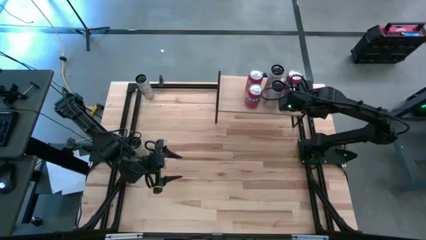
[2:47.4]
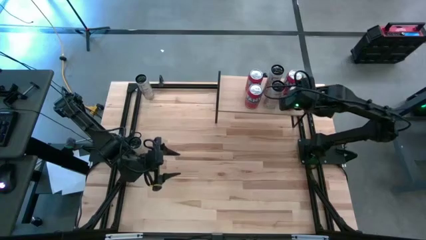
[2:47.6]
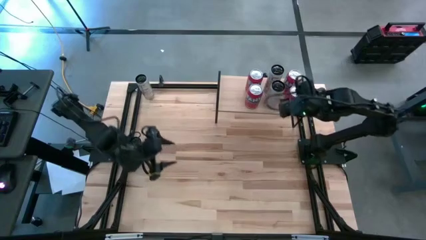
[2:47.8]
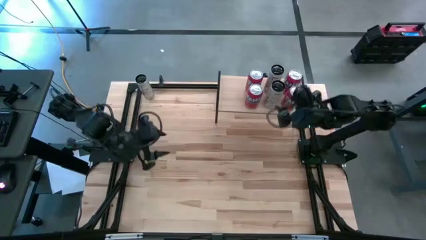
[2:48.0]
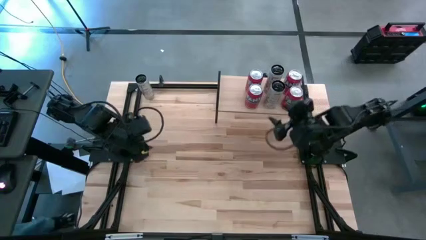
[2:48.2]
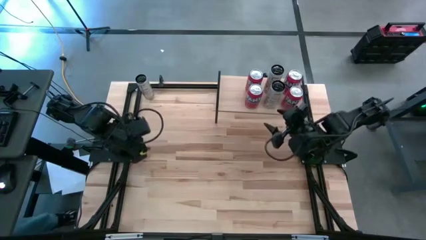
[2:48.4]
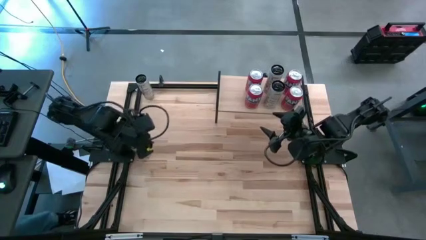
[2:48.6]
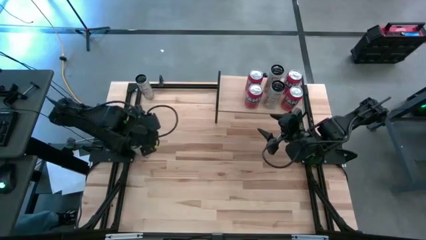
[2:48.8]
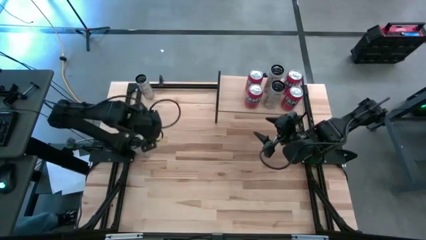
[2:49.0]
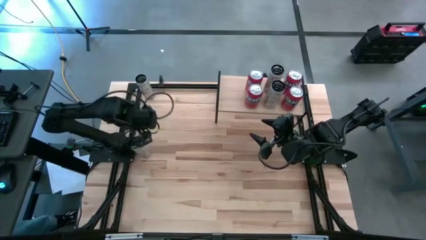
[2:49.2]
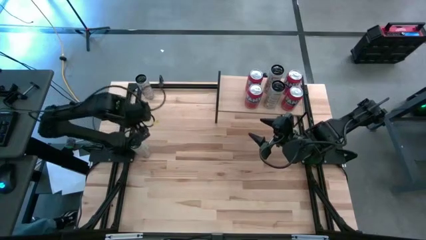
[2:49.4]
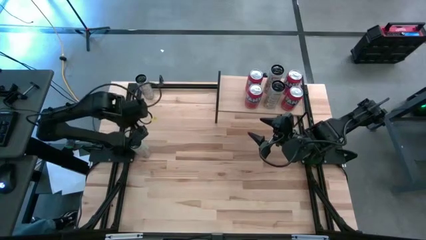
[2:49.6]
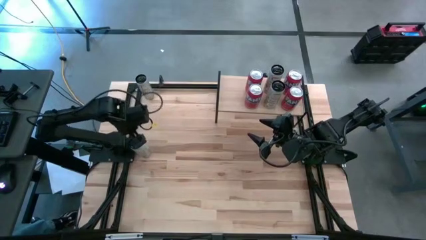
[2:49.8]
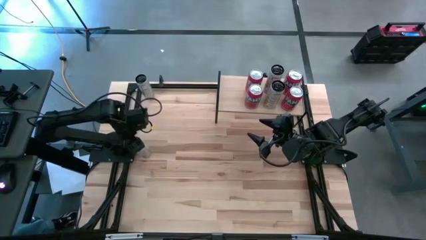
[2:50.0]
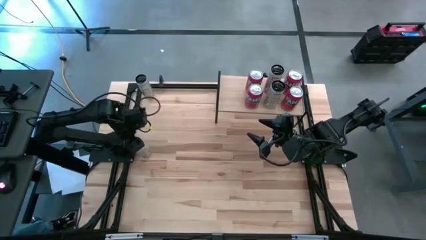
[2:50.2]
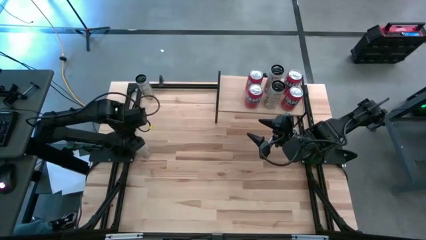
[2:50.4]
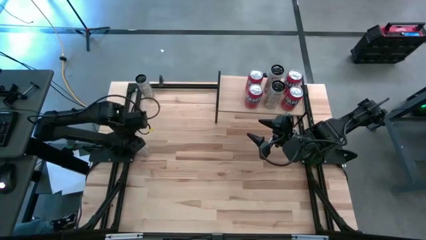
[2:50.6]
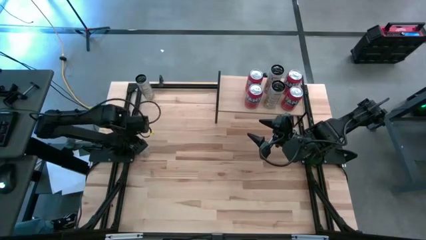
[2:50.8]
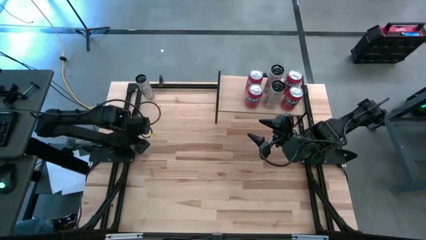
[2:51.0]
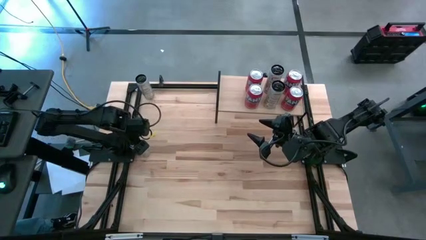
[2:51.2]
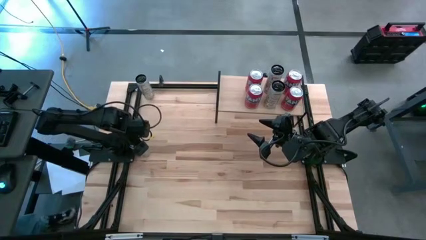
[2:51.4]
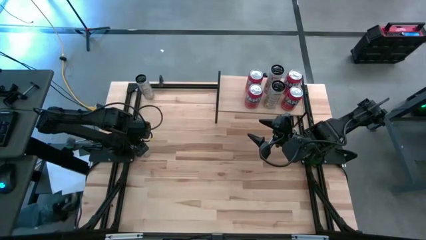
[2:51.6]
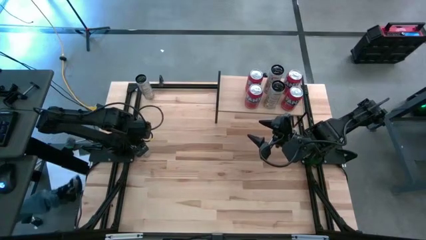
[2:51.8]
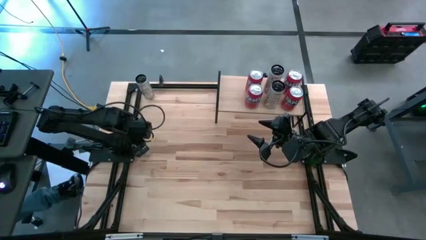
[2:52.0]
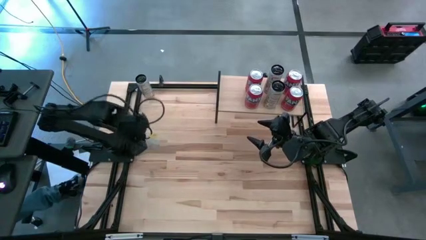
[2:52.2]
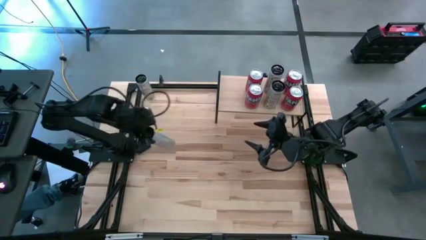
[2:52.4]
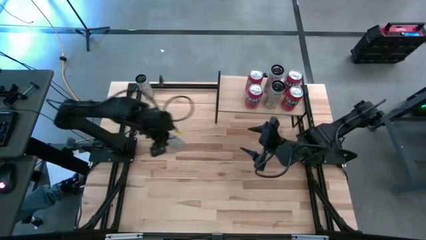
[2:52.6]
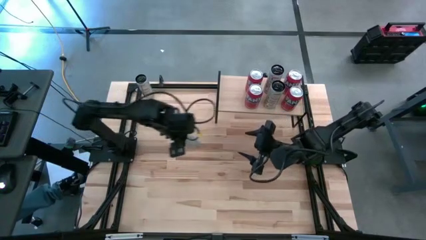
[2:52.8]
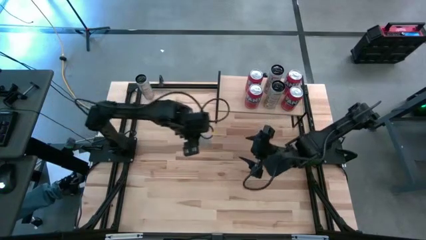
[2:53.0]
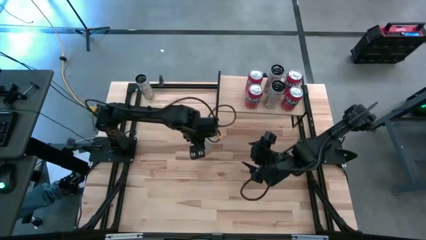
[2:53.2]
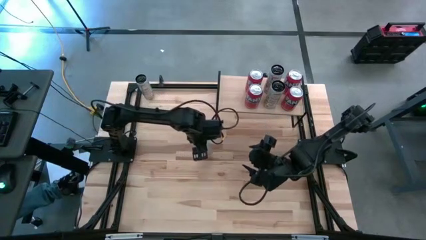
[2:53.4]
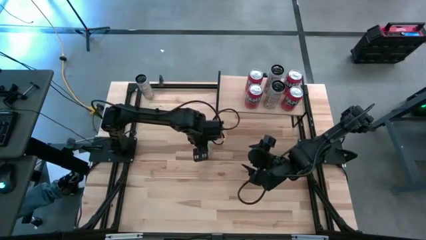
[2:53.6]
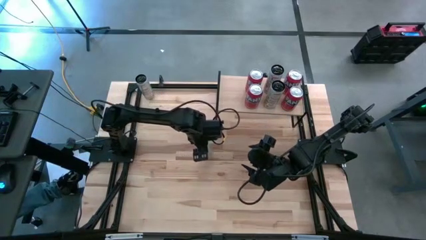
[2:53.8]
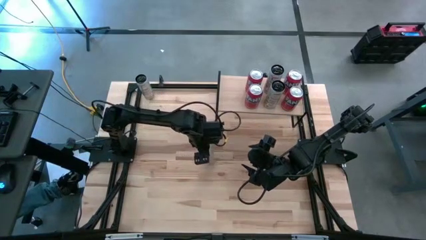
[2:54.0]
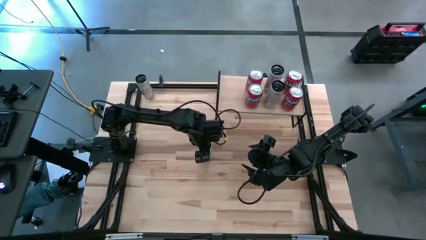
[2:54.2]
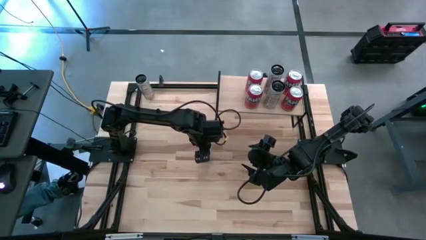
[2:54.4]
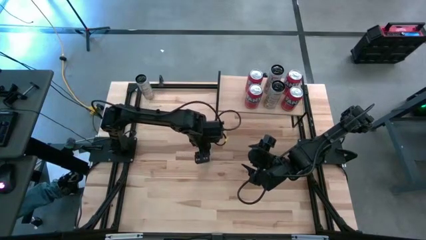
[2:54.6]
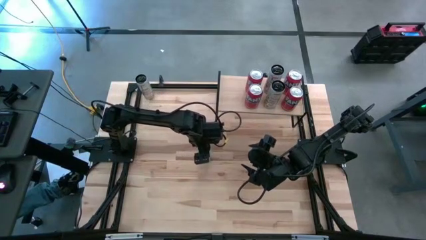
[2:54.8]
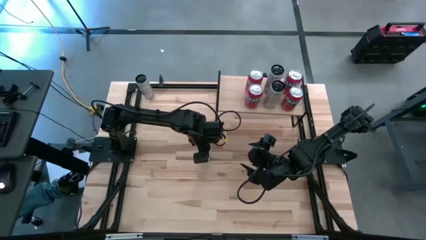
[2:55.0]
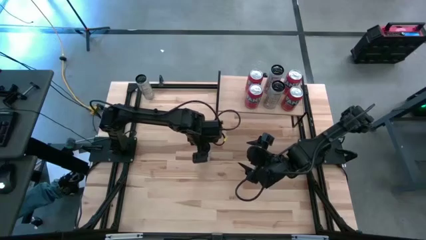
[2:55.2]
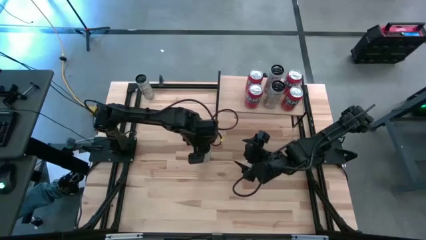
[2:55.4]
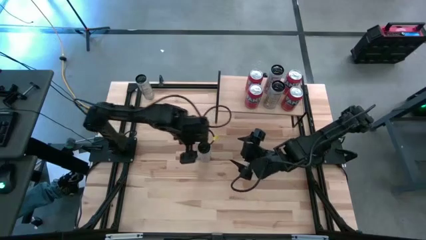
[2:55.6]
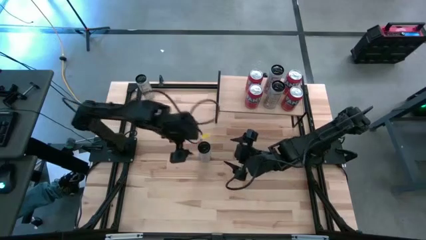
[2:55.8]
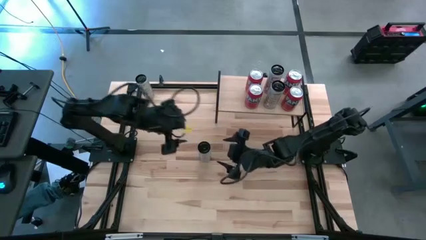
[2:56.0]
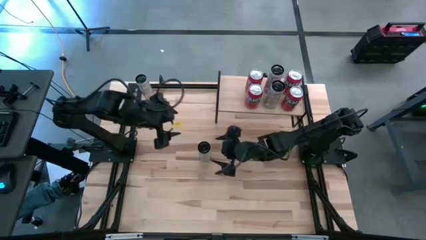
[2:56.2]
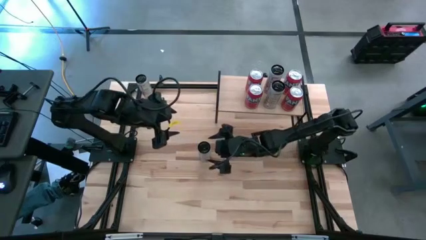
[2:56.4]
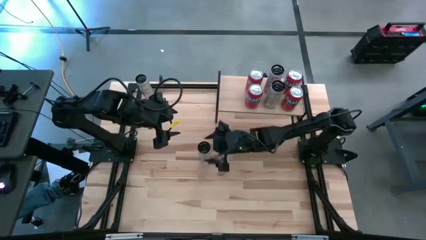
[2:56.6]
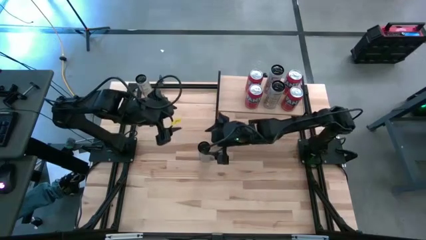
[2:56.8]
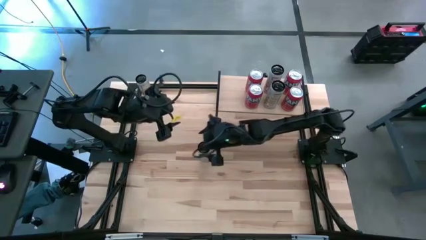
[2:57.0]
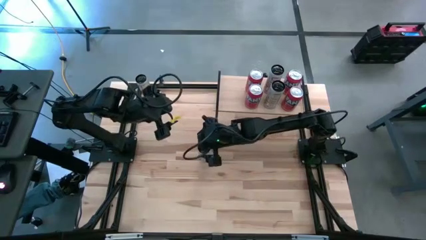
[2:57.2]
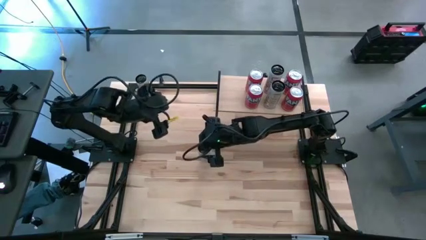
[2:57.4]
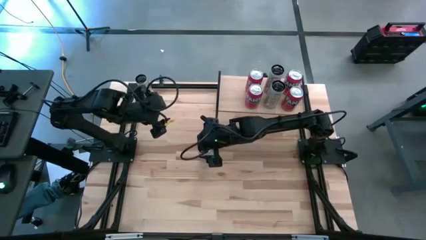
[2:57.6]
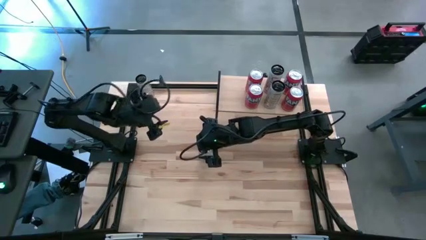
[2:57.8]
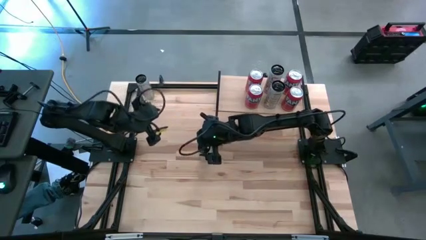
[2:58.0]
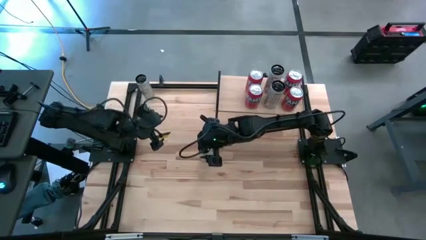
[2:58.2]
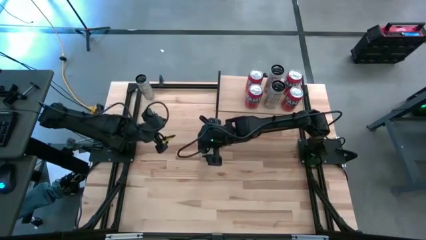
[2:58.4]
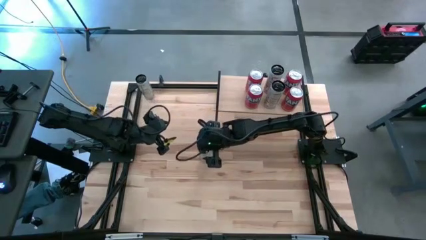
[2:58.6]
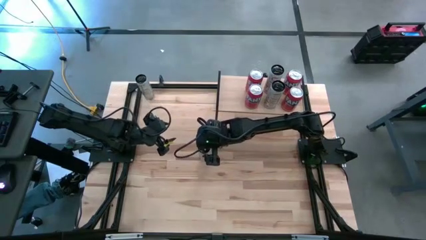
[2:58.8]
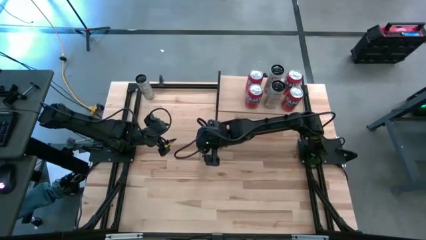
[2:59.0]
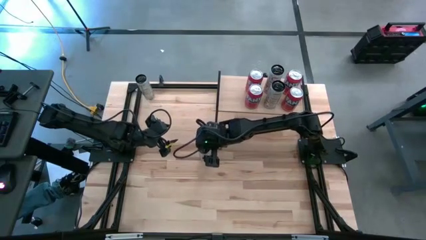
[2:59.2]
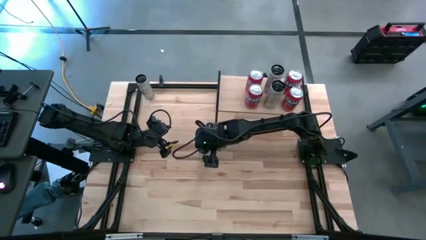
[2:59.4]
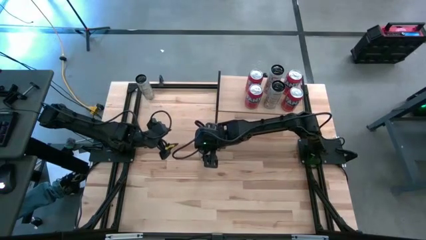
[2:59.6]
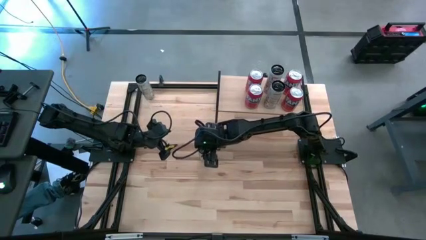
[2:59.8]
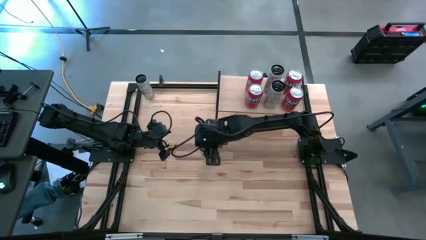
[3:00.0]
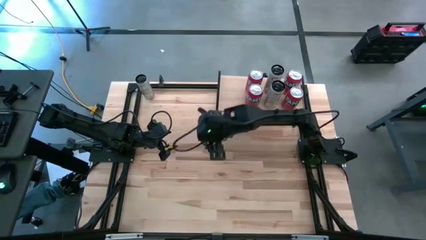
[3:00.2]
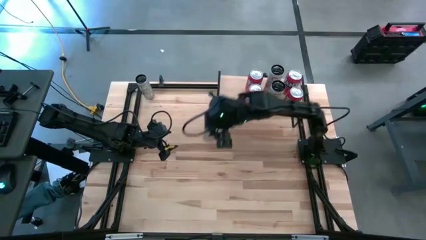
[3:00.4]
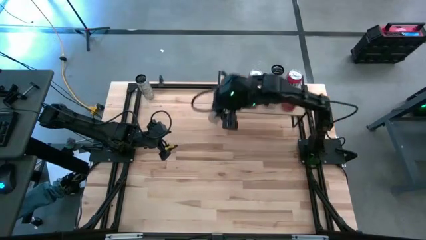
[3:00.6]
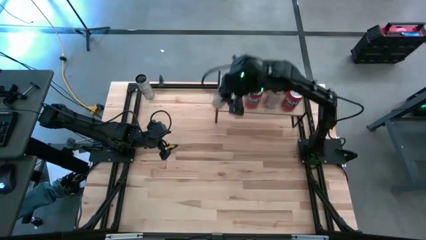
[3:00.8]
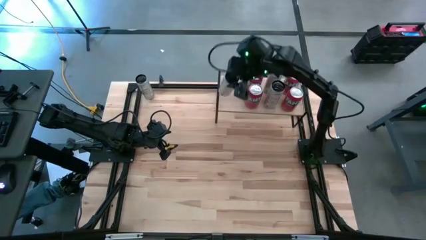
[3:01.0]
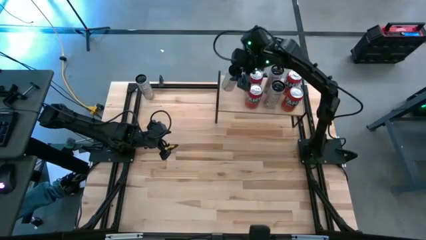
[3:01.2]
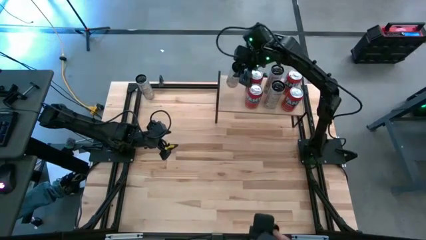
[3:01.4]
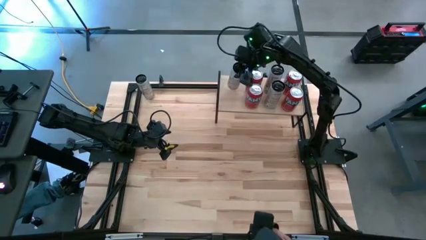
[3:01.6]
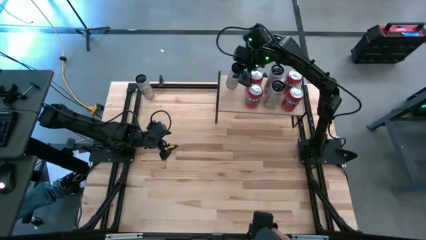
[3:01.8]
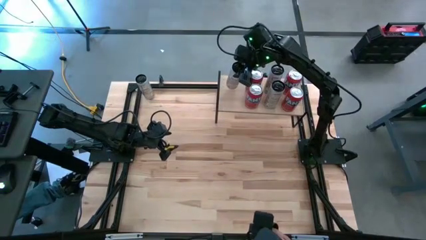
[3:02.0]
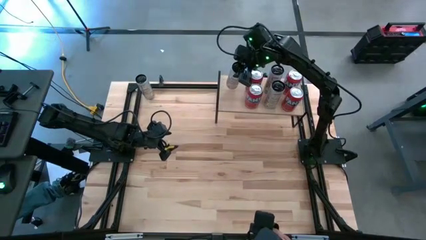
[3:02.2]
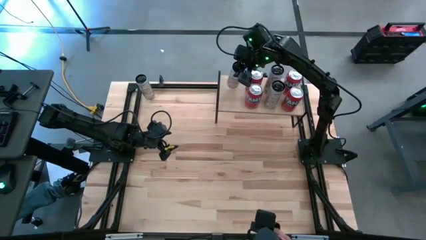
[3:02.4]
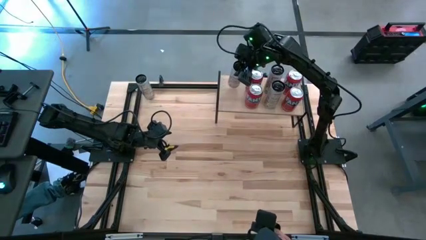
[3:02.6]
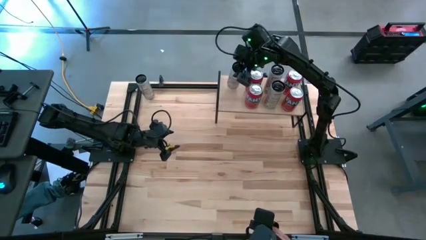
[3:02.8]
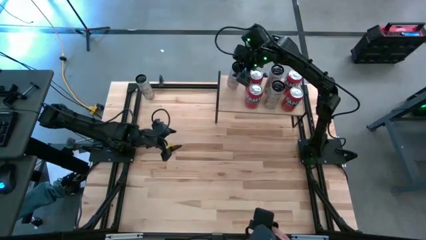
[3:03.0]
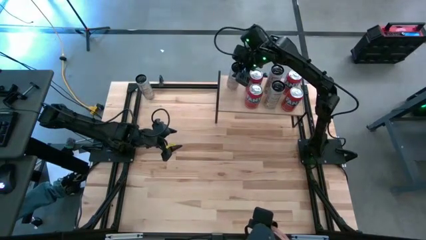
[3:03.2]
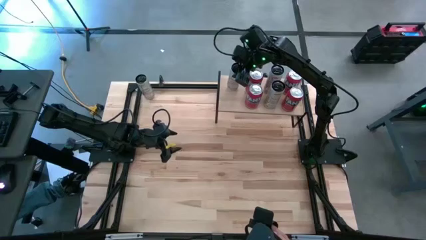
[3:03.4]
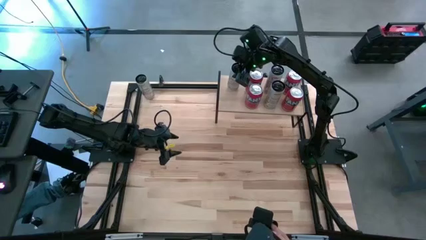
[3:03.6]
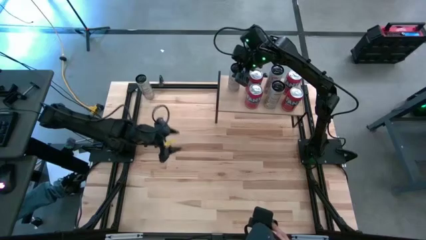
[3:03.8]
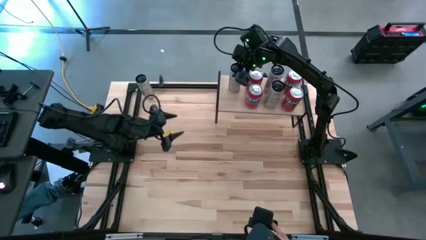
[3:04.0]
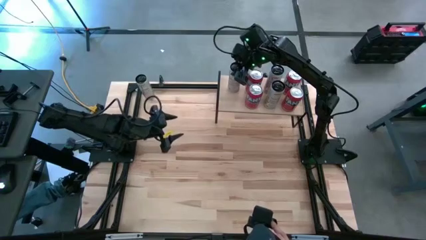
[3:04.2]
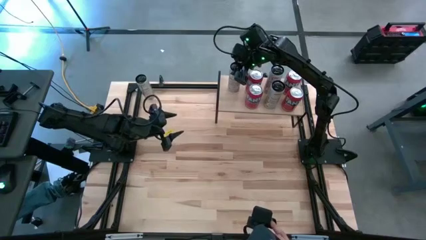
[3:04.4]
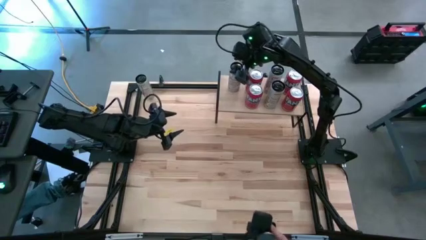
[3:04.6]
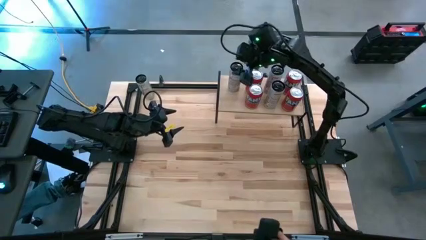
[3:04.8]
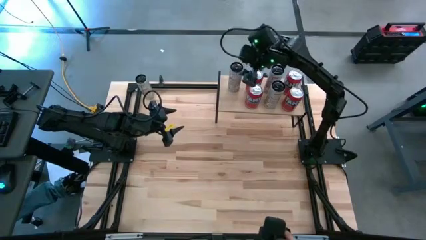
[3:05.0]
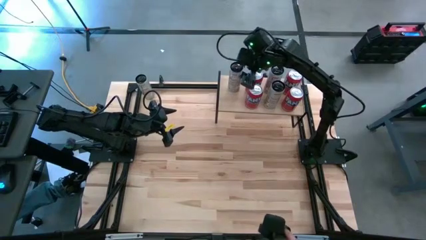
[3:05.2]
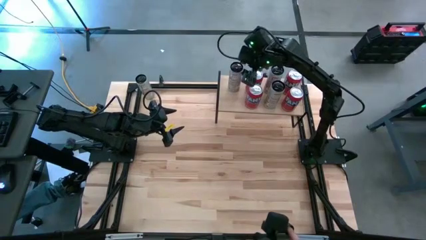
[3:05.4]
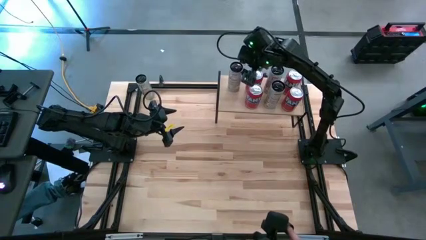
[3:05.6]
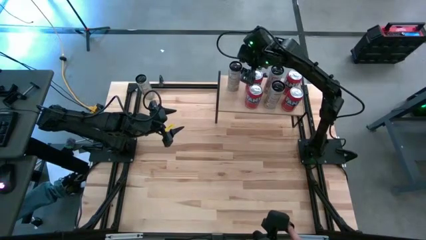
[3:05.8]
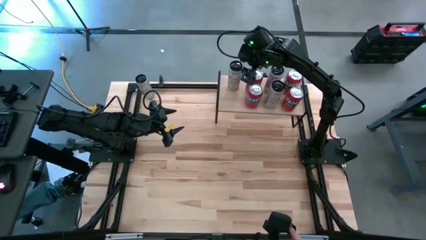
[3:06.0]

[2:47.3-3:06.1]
Task: Place canned beverage on shelf
Put the white soda can on the shelf
